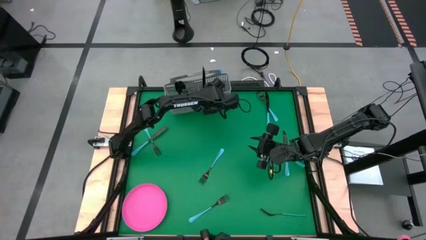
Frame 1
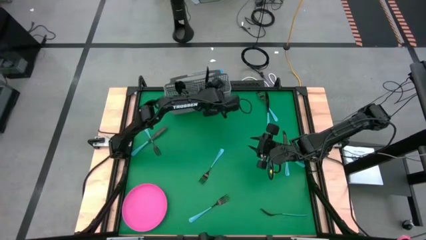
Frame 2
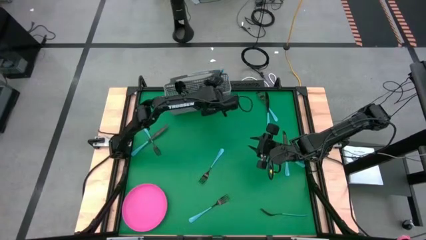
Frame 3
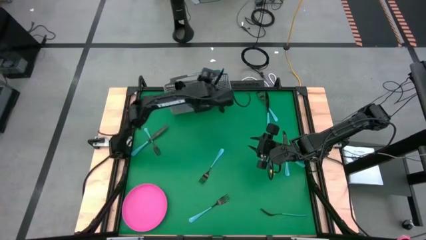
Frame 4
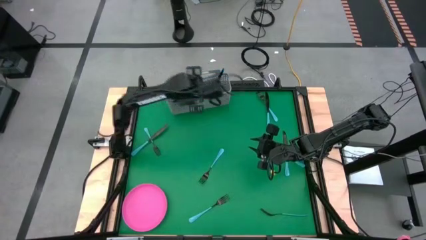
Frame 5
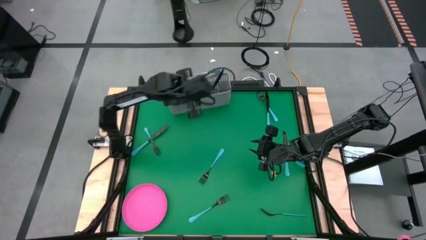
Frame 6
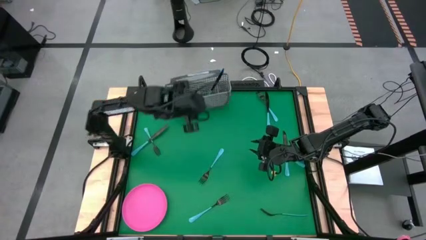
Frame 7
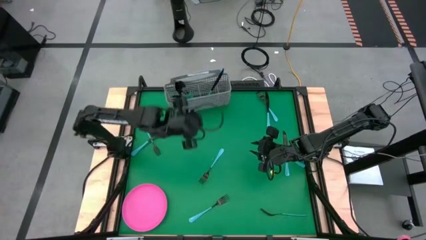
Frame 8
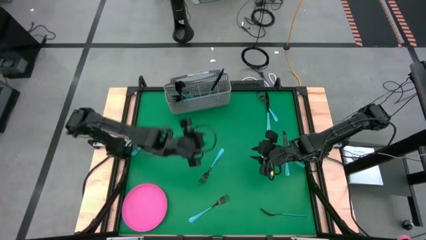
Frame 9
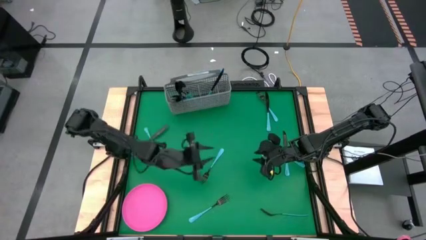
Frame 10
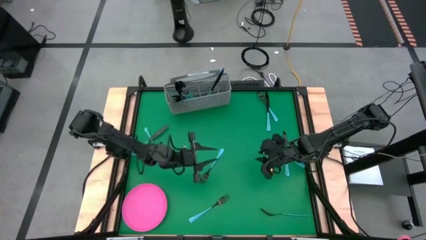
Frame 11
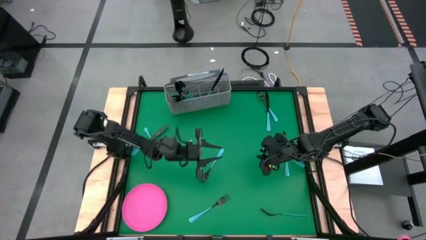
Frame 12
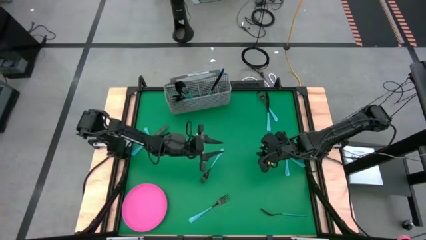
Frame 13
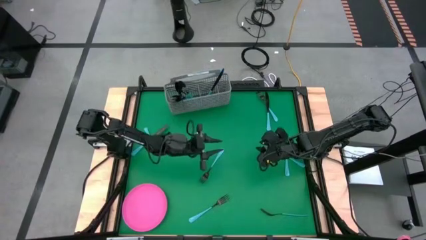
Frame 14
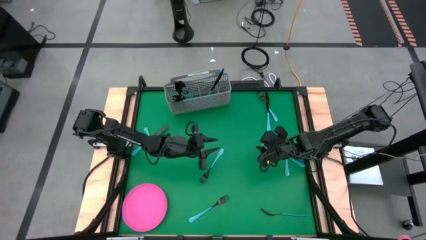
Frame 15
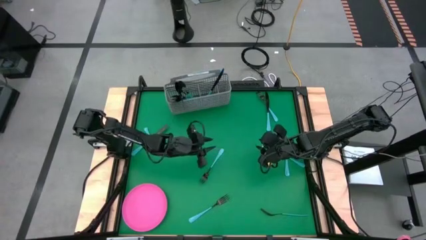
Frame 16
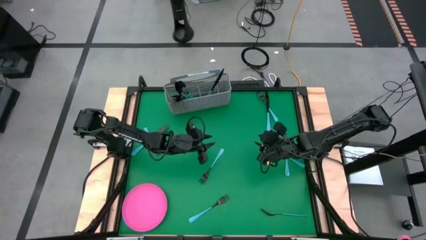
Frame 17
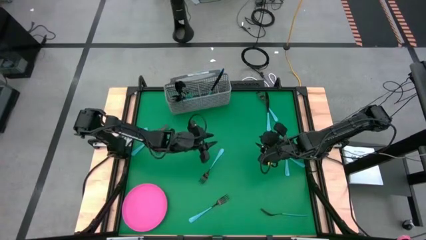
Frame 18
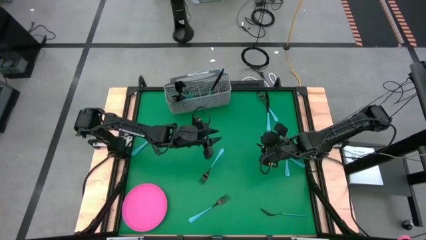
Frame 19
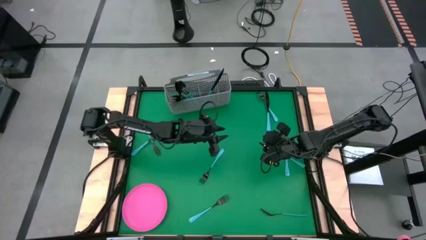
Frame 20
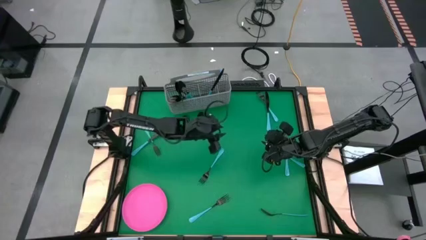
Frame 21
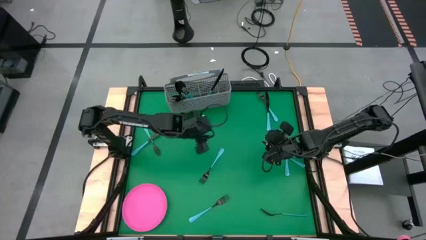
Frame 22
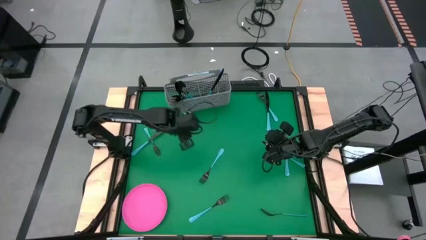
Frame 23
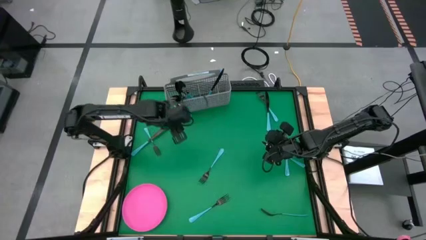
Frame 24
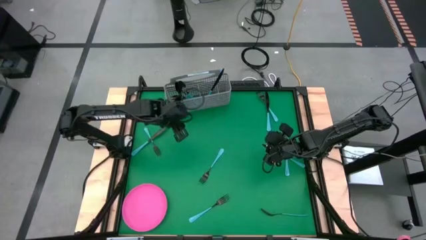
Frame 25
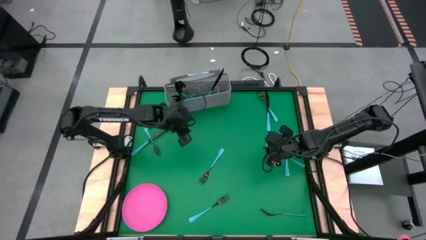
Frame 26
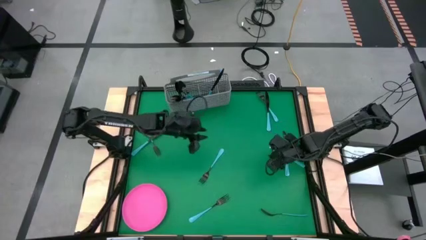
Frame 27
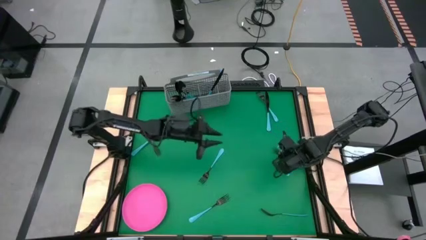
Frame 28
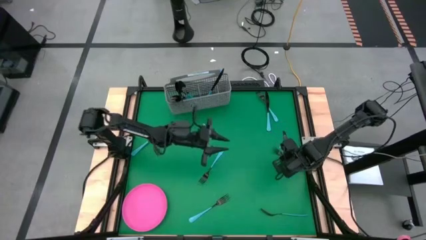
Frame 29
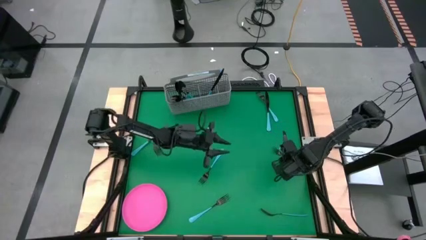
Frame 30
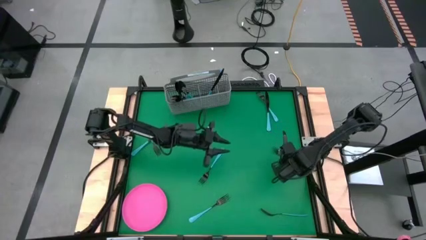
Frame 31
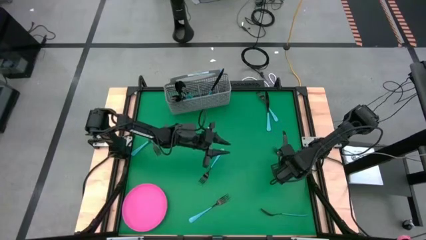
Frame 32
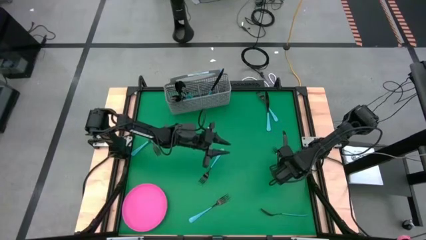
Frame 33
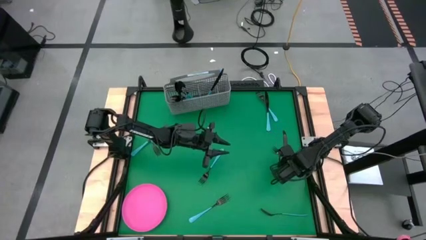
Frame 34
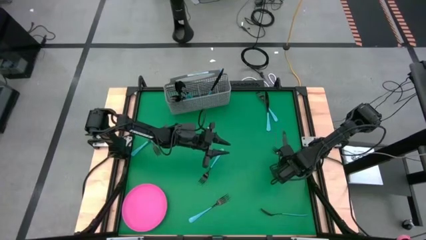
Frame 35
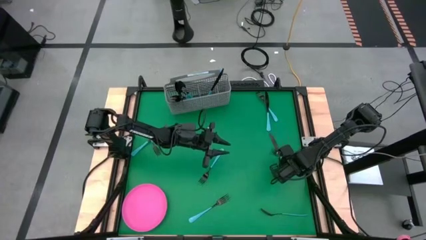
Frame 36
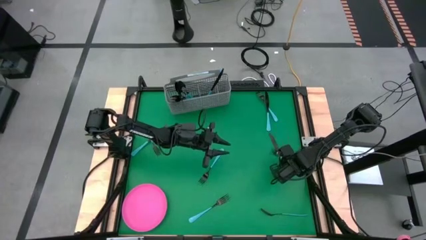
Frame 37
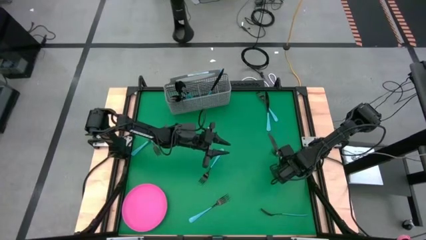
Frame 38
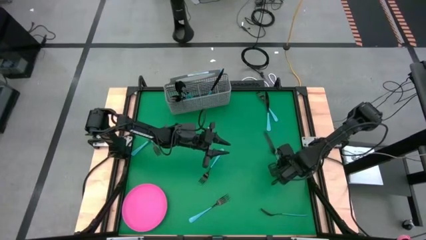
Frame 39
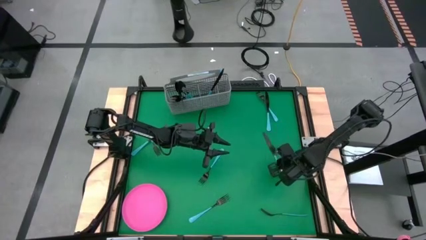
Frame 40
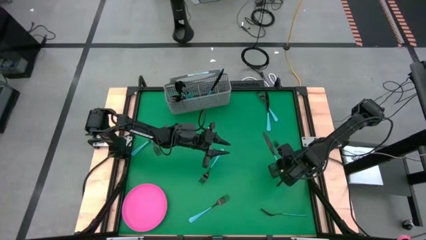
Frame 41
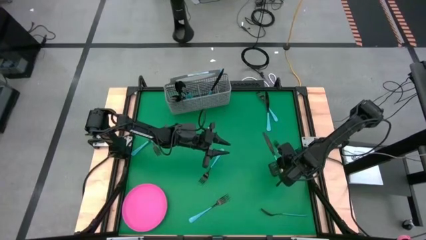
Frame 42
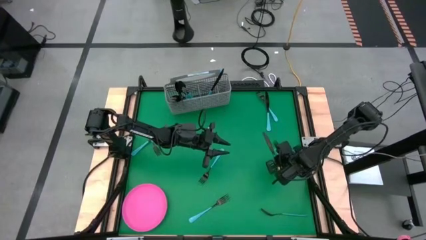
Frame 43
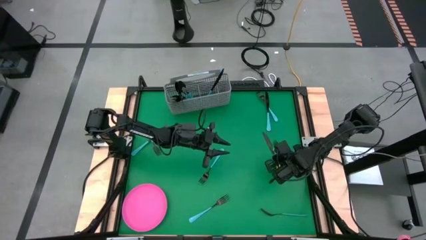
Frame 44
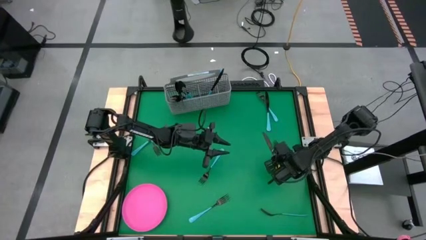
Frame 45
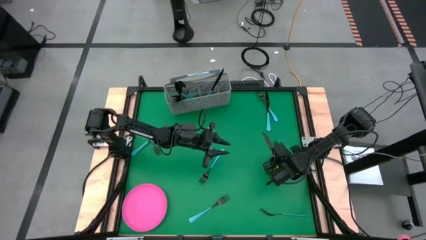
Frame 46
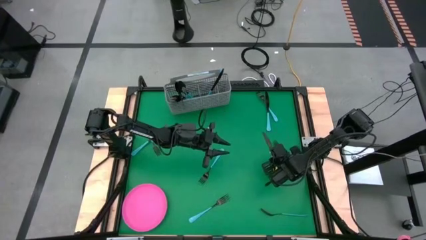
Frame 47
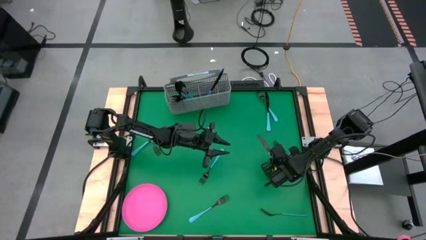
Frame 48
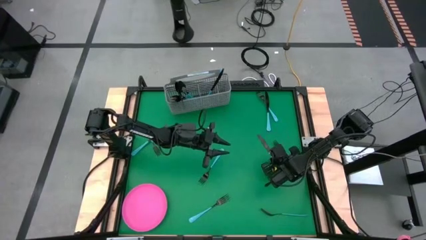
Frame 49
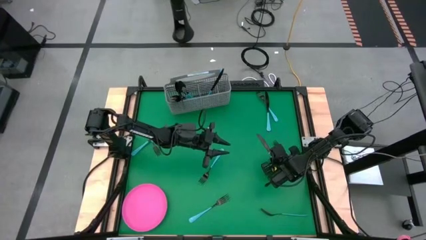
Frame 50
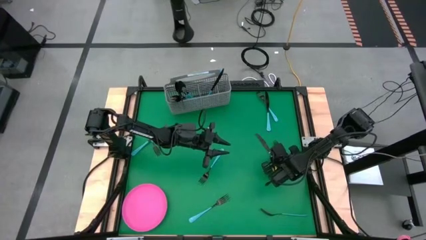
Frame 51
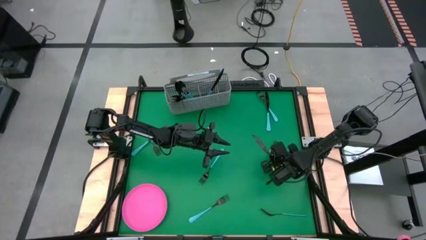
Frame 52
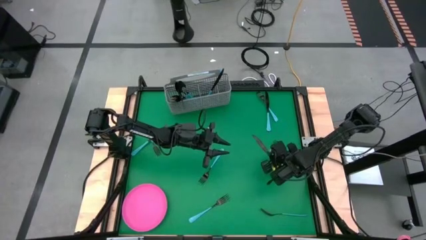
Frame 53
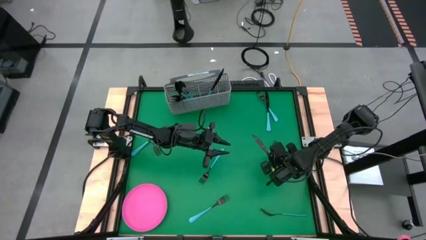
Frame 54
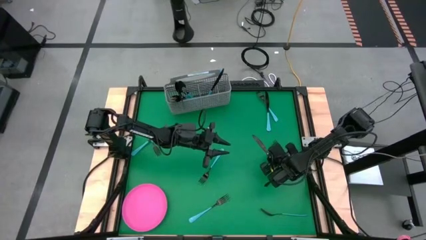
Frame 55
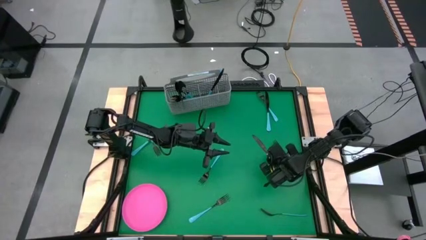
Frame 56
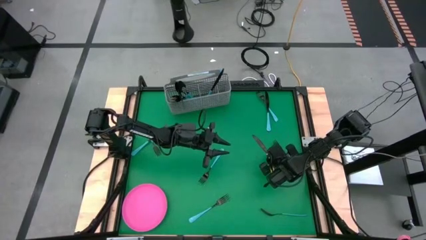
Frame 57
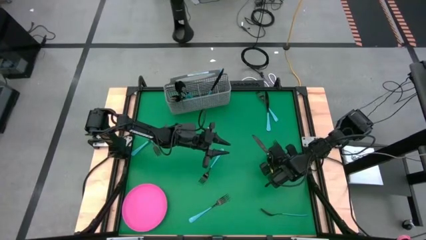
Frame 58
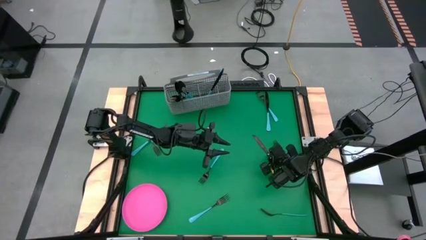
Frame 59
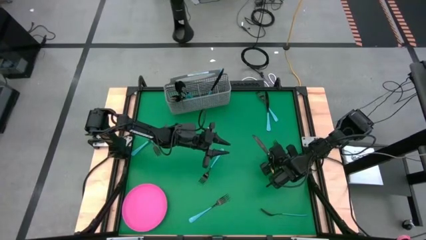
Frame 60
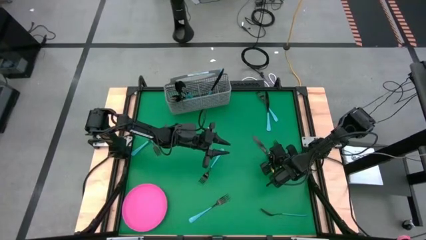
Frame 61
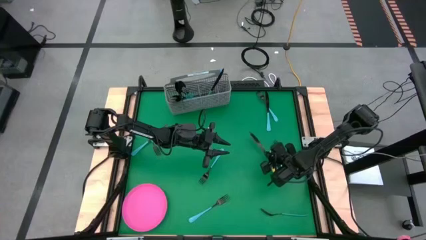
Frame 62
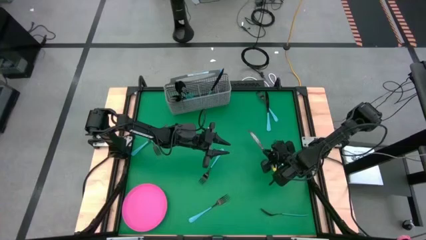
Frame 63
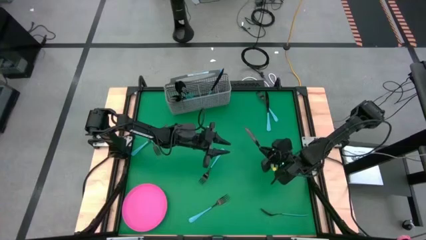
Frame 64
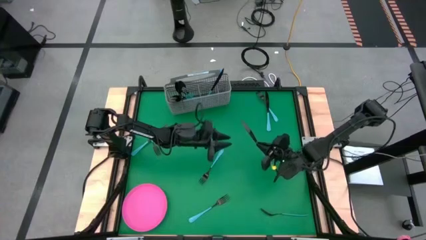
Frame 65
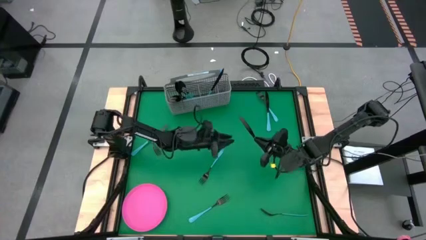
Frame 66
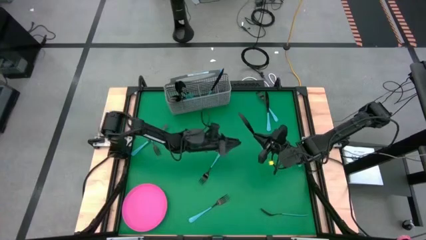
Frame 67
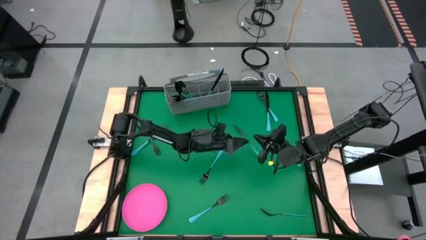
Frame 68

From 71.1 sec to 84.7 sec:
Task: Sort silverware
Put the blue table knife into the silverware basket

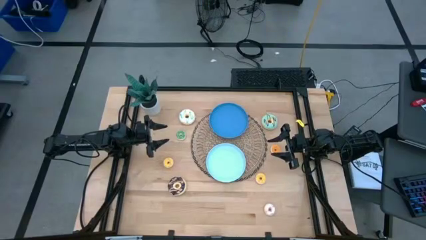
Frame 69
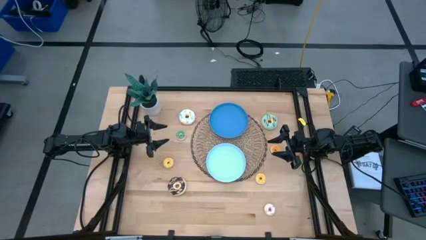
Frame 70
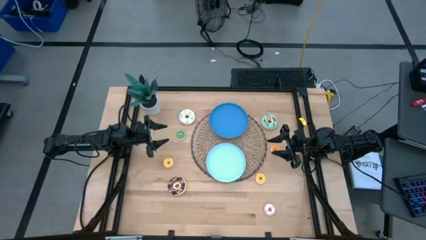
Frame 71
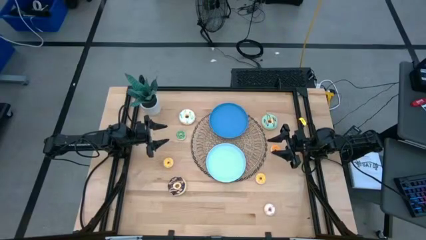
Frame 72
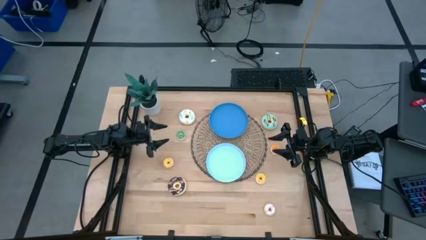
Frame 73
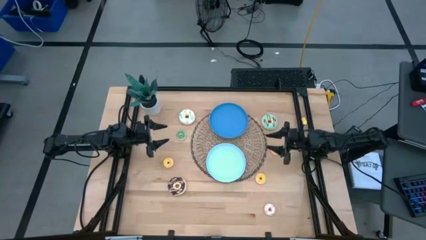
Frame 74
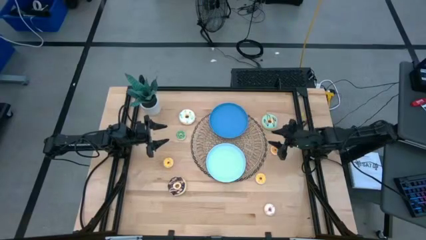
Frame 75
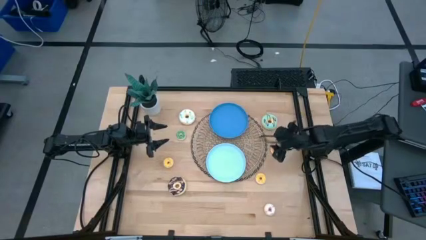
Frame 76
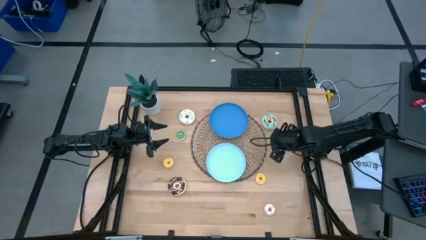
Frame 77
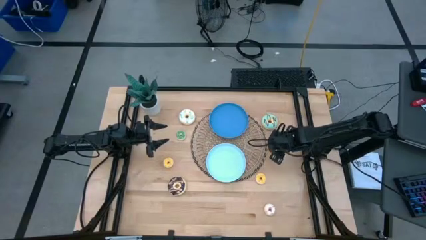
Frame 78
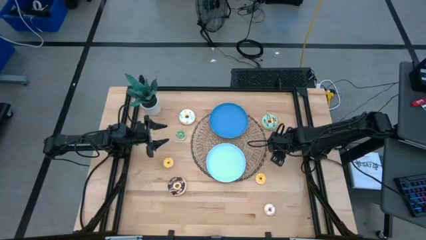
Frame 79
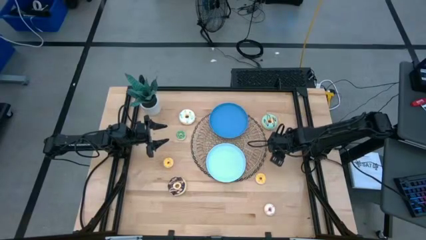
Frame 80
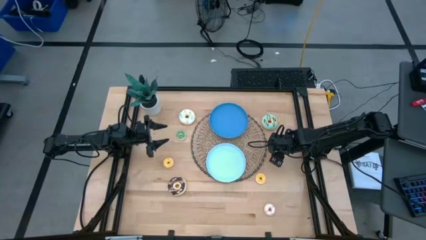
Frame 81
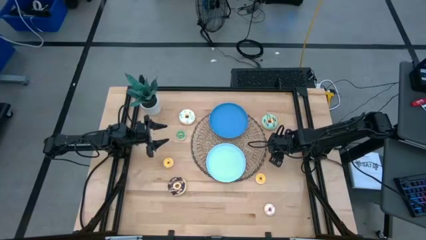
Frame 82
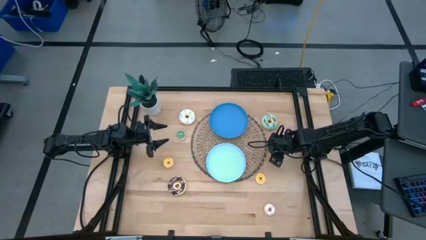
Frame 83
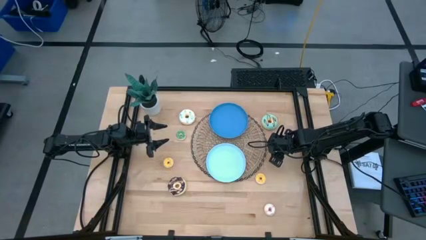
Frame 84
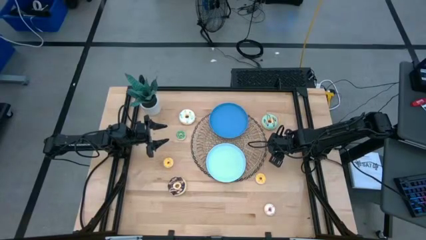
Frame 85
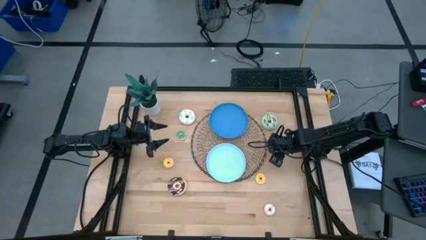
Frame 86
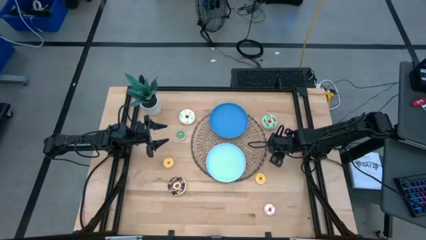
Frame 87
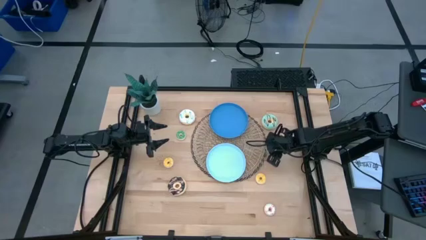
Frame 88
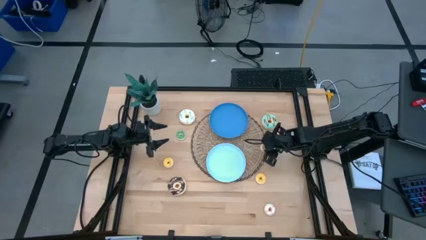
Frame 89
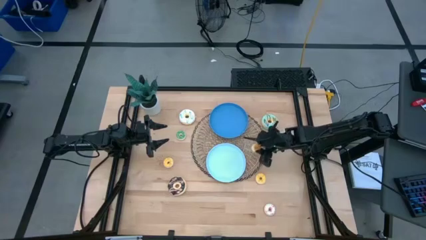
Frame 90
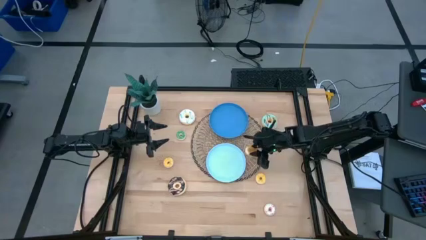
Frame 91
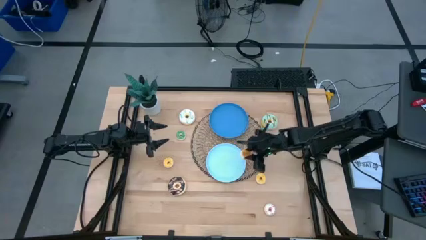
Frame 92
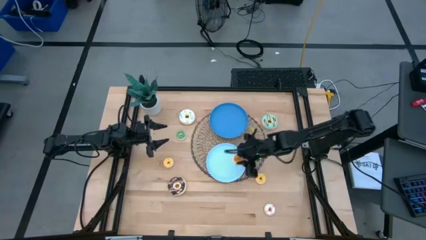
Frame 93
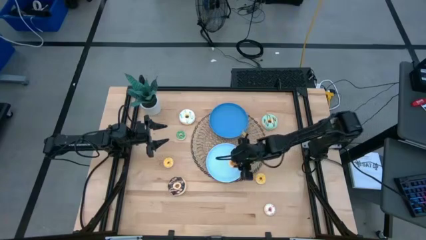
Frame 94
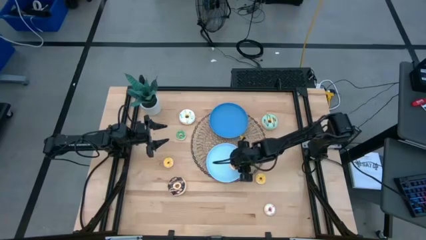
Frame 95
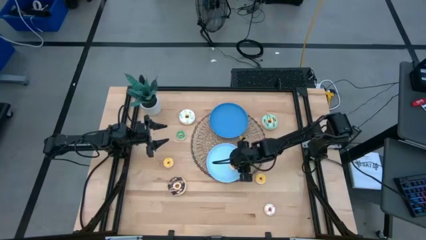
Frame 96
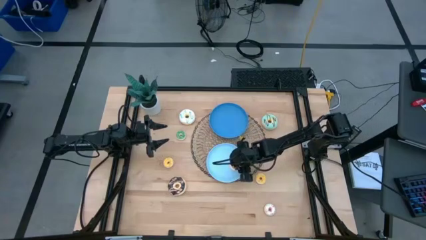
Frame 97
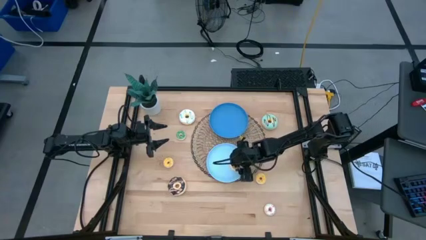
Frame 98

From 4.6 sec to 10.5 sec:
Task: Pick & Place donuts
Put the small orange donut on the light blue plate
